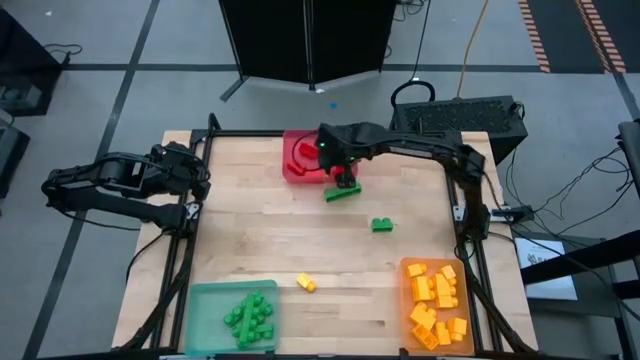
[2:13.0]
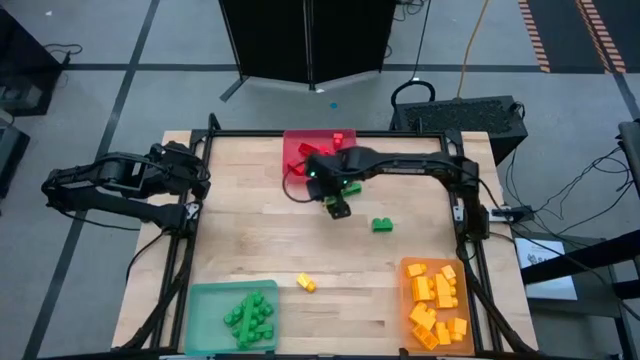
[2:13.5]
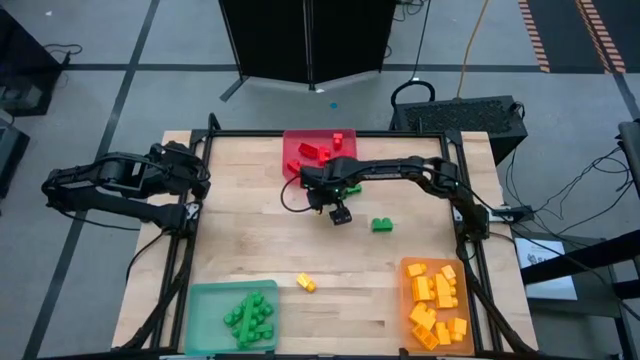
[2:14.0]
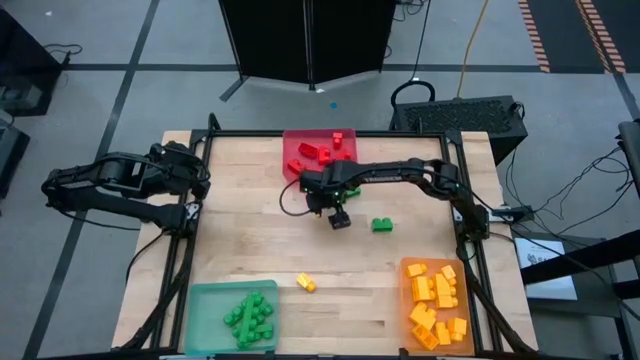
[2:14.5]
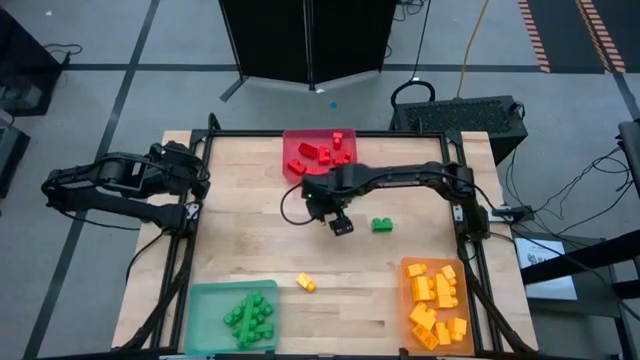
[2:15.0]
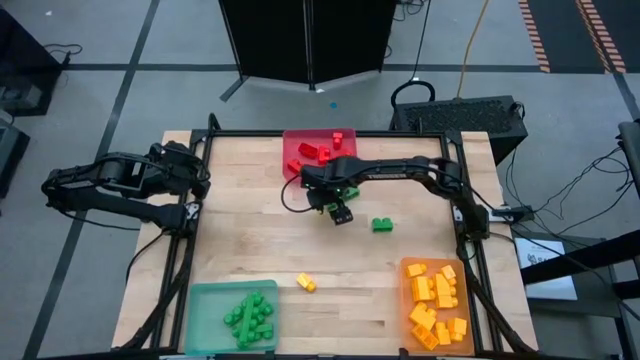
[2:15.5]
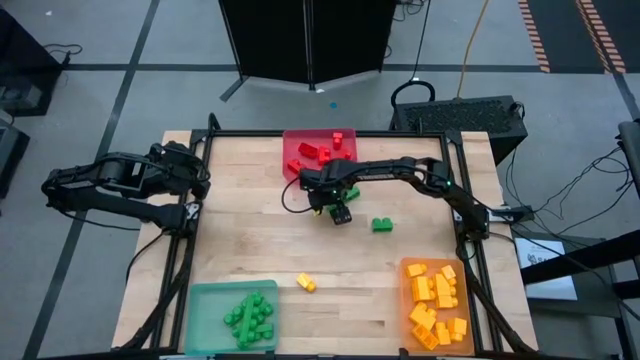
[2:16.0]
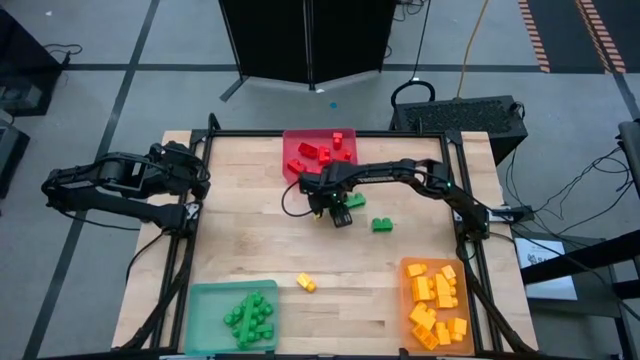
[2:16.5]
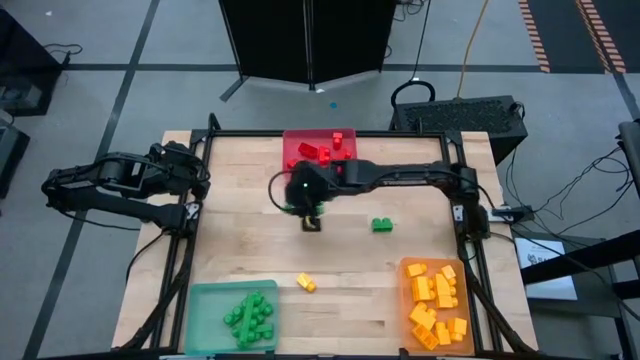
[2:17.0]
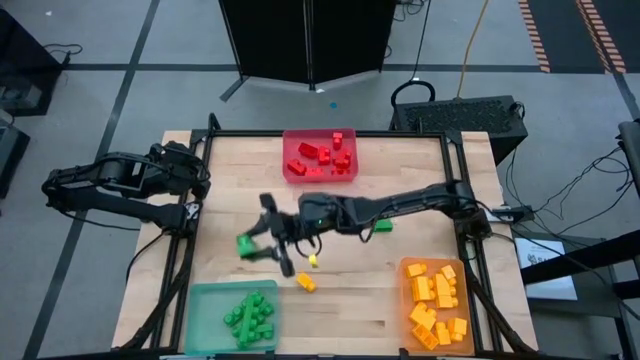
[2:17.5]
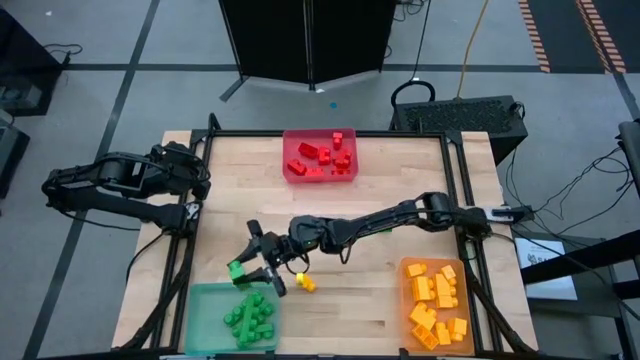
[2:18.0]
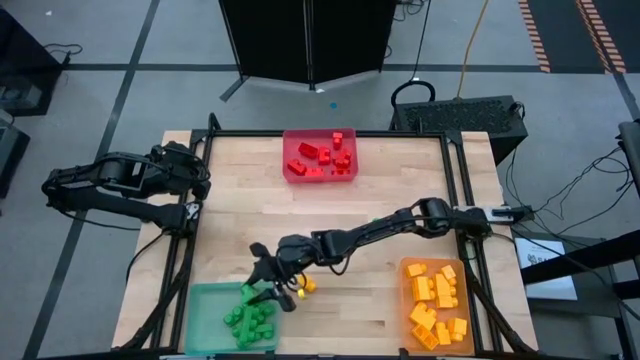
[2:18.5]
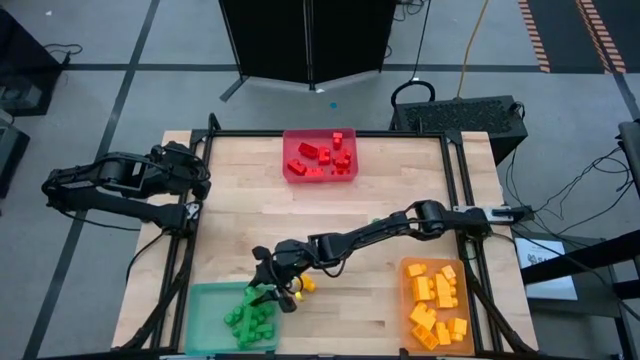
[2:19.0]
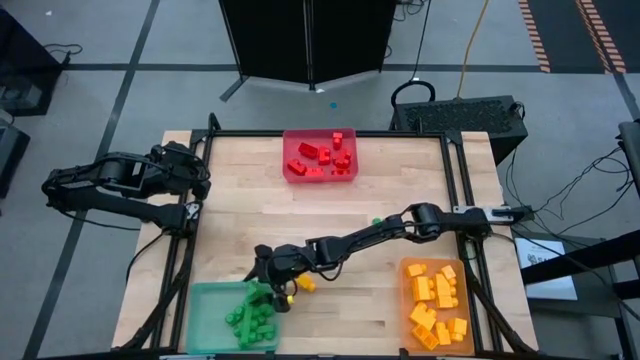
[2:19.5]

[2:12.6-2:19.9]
Task: Sort blocks
Put the green game piece into the green bin

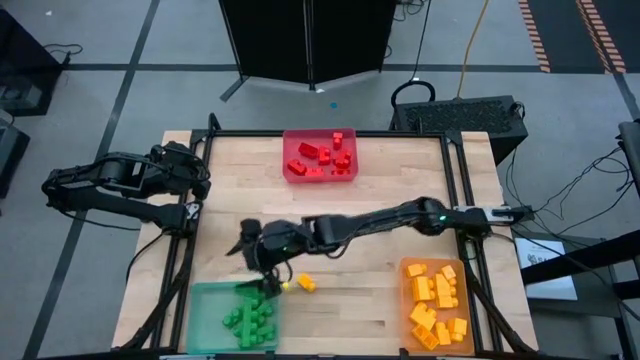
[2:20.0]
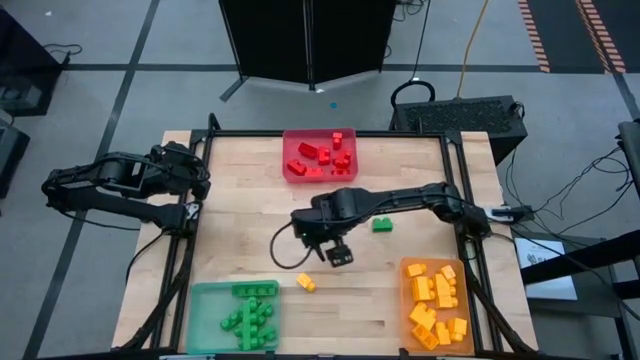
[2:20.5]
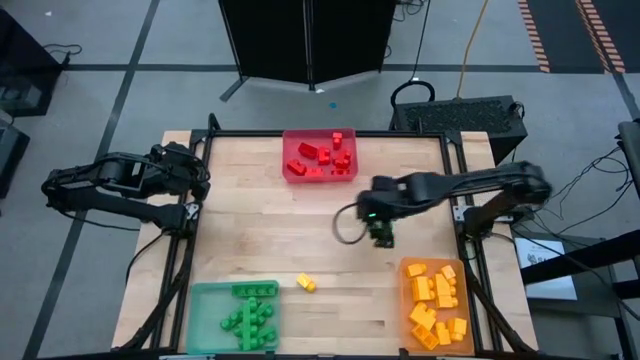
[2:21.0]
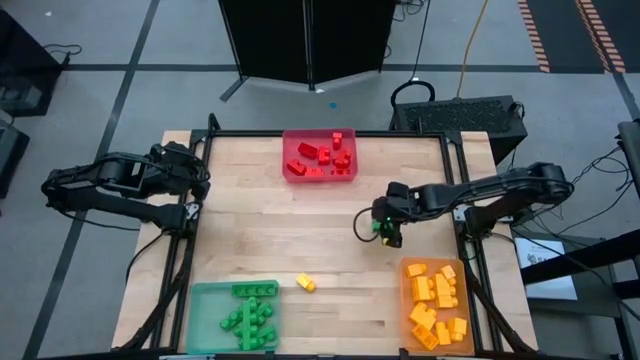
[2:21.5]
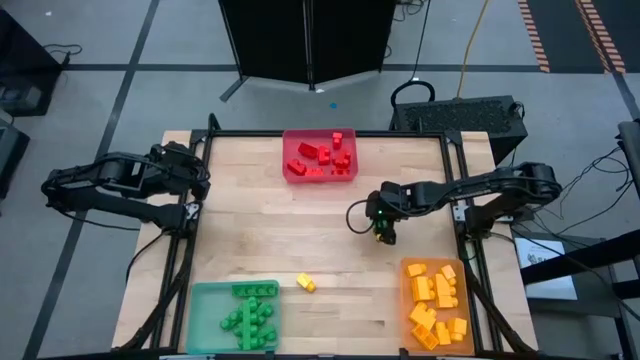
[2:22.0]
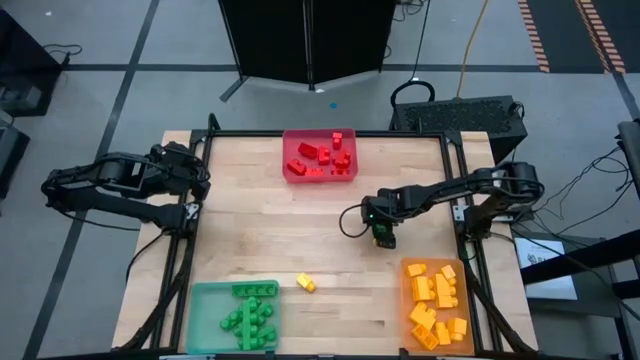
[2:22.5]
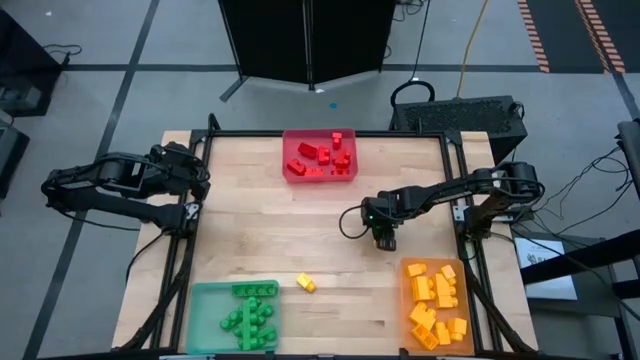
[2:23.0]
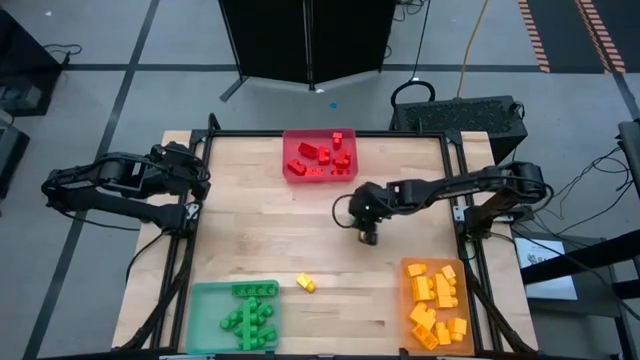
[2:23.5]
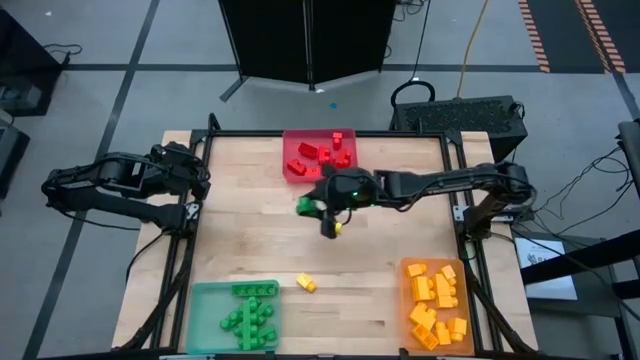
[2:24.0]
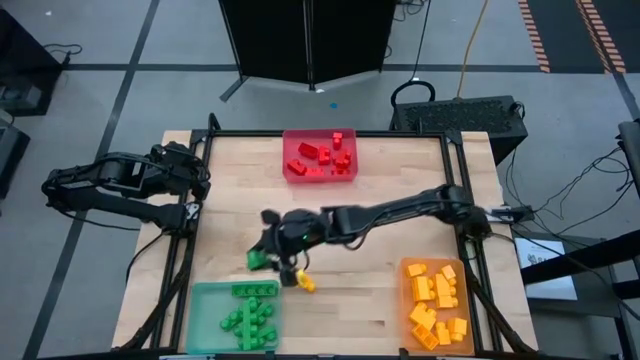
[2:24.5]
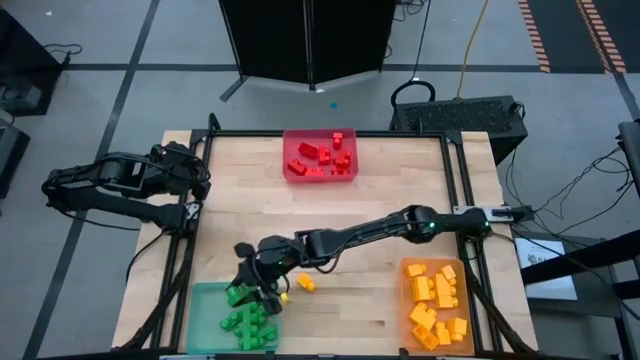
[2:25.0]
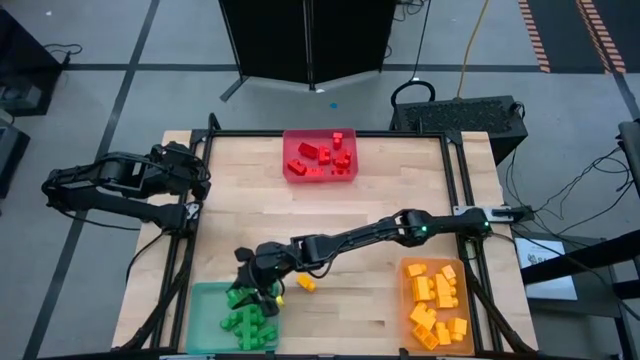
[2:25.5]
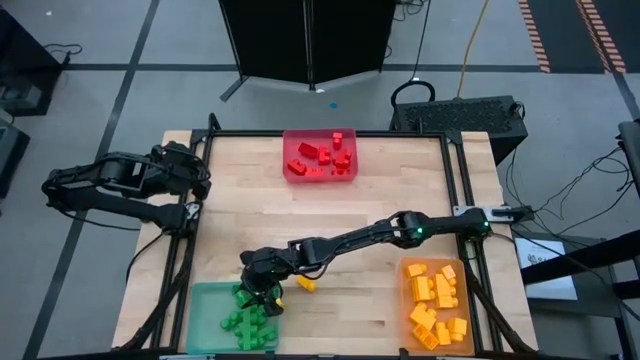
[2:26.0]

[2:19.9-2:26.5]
Put the green game piece into the green bin

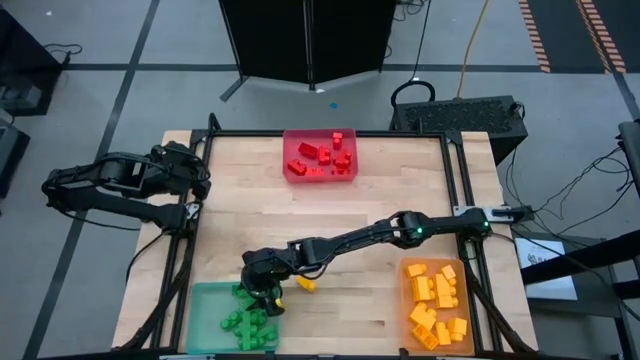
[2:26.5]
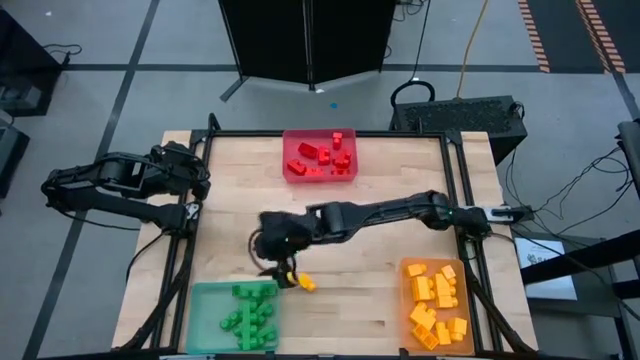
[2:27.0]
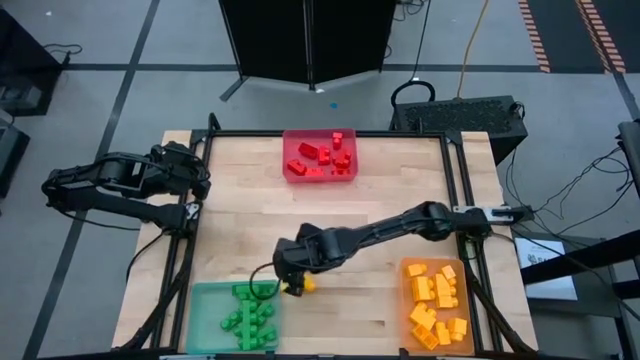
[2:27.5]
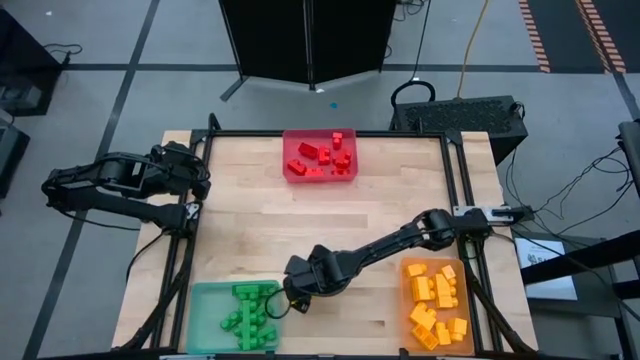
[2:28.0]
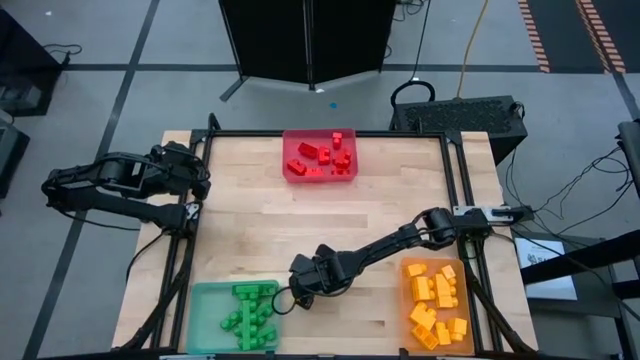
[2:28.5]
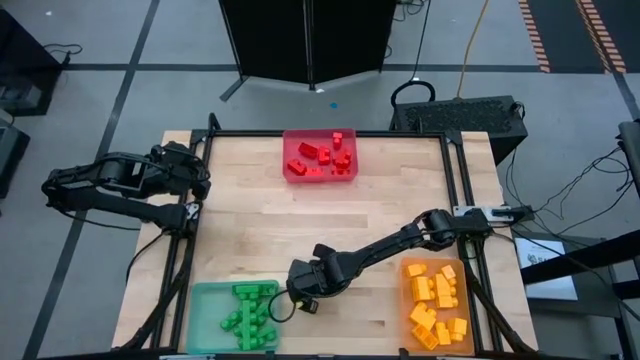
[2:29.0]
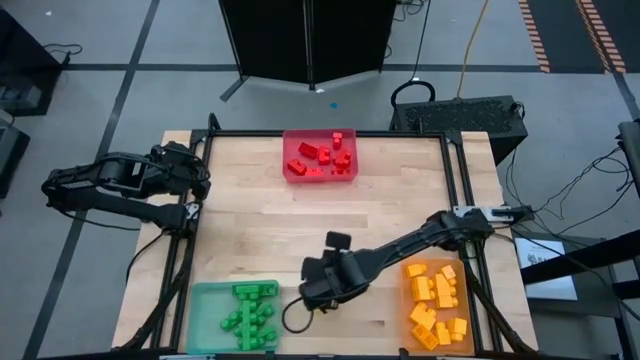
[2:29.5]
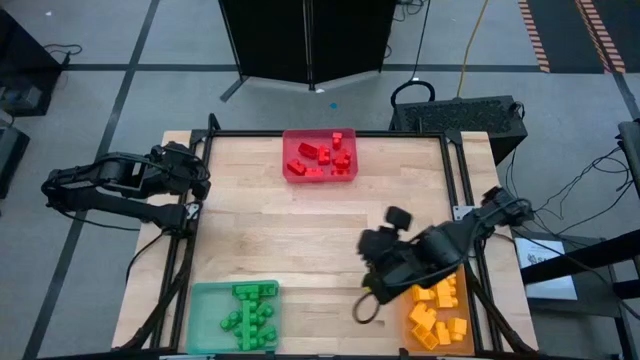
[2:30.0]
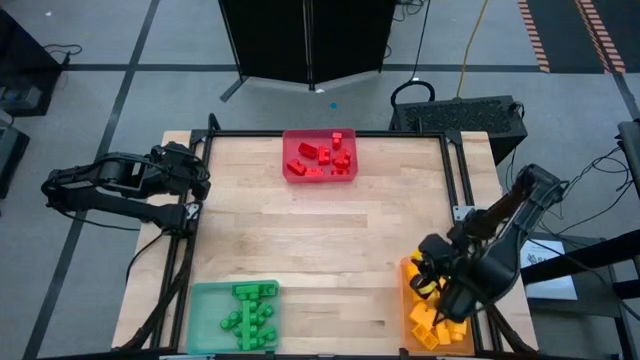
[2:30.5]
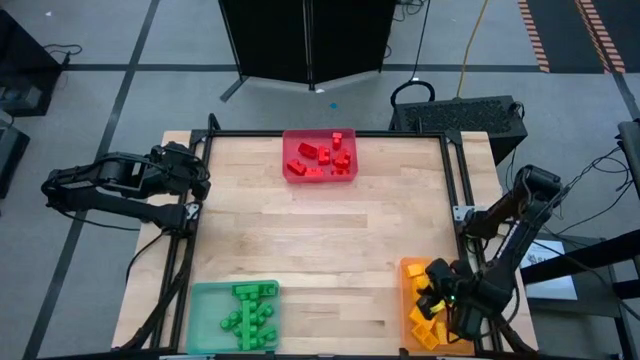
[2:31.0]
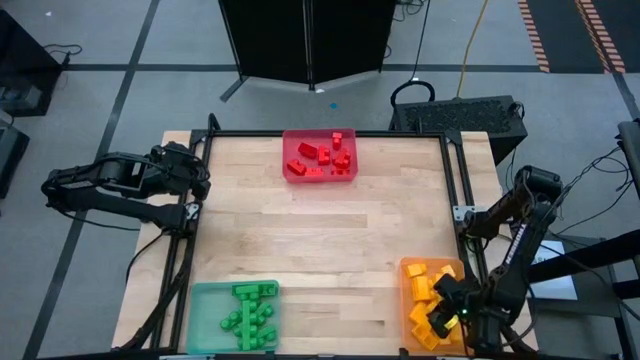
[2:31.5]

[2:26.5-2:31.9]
Put the yellow game piece into the orange bin

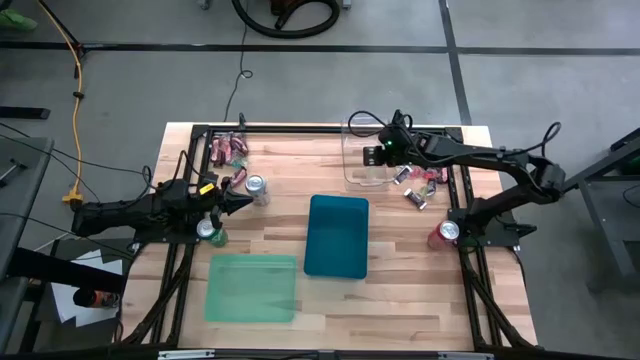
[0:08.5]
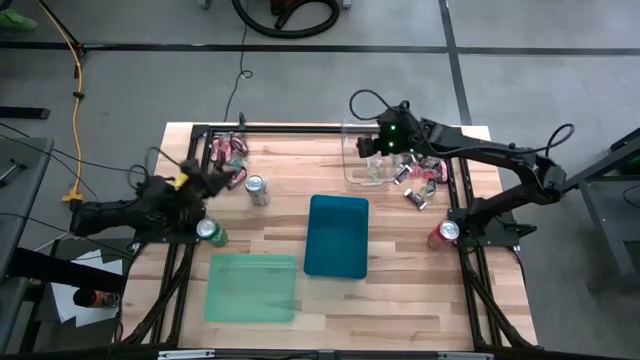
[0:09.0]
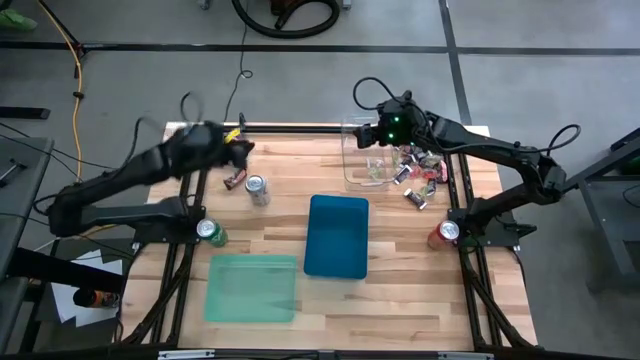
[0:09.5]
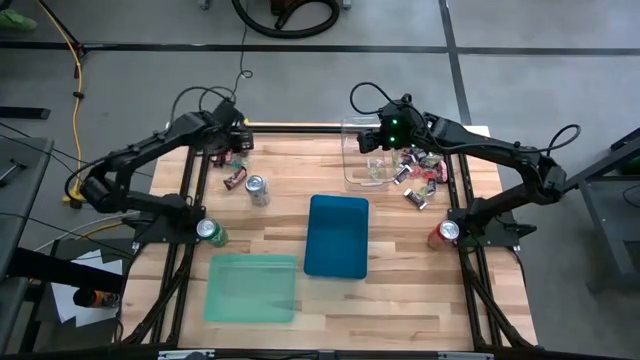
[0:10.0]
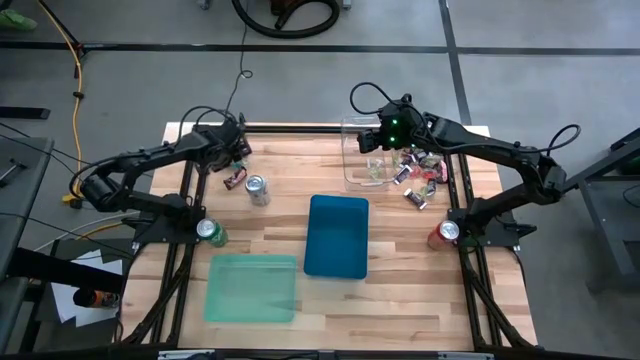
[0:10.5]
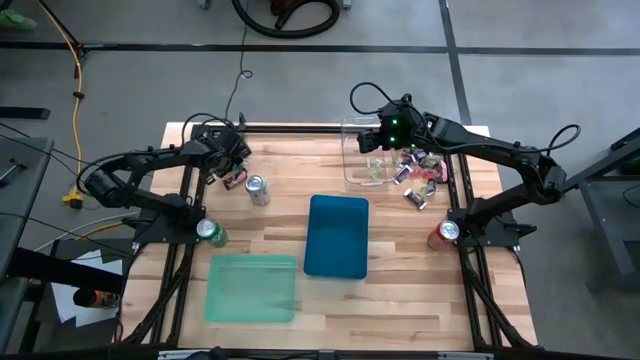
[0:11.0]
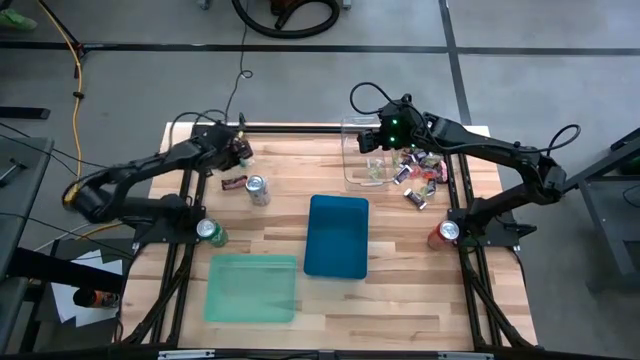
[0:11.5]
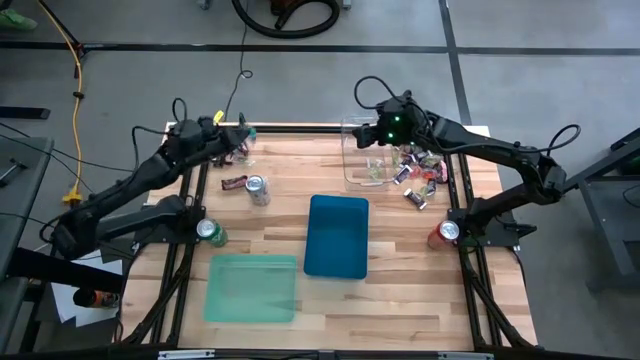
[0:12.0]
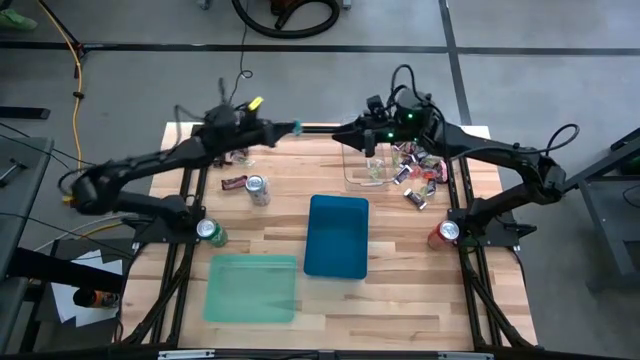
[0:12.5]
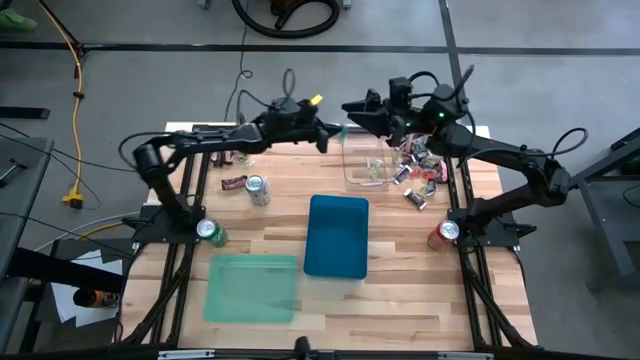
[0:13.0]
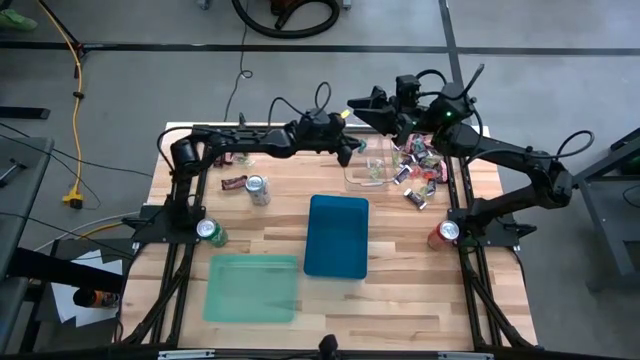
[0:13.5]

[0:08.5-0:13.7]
Task: Sort candy
Put the blue gummy into the transparent bin
